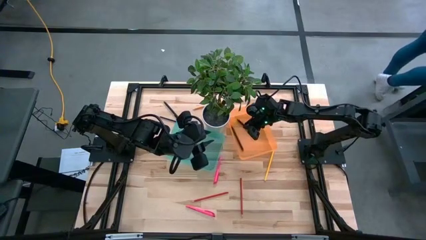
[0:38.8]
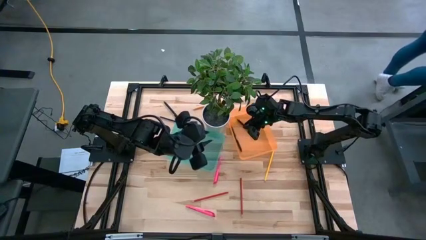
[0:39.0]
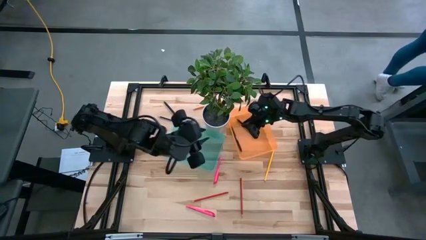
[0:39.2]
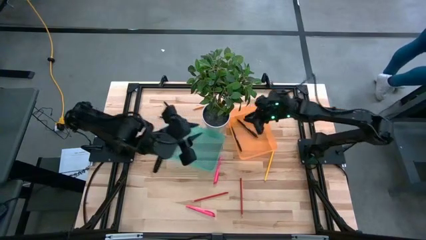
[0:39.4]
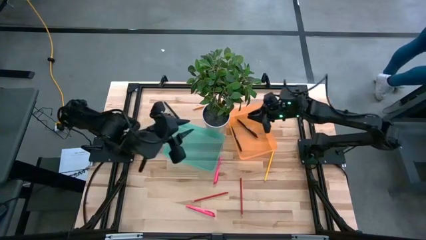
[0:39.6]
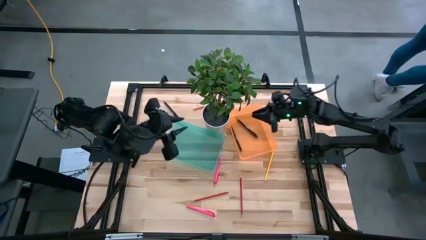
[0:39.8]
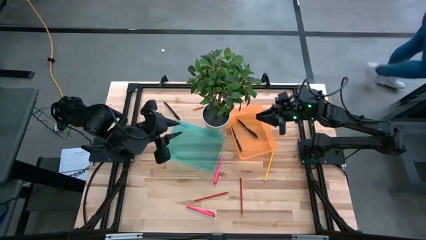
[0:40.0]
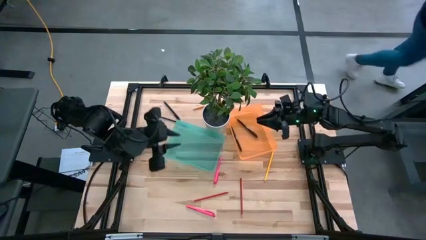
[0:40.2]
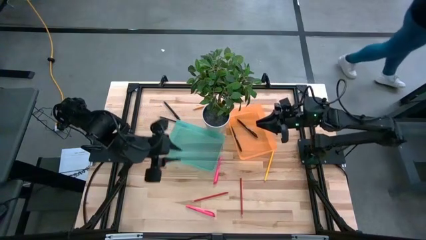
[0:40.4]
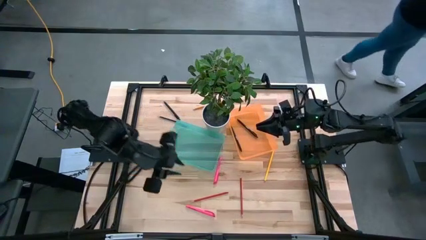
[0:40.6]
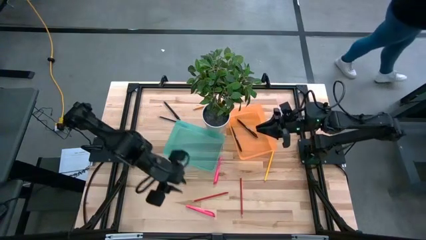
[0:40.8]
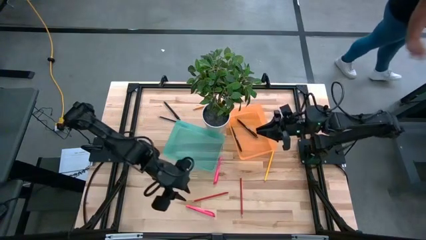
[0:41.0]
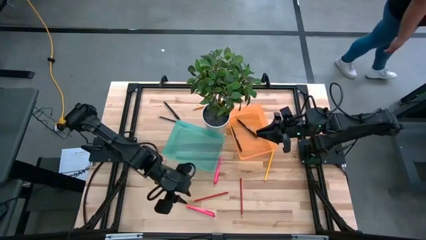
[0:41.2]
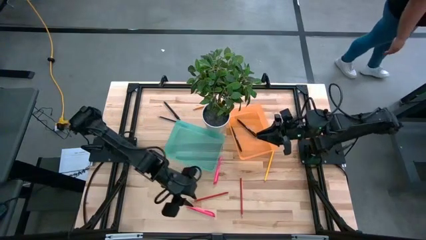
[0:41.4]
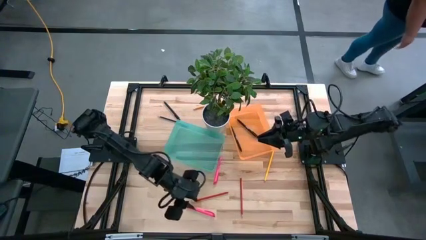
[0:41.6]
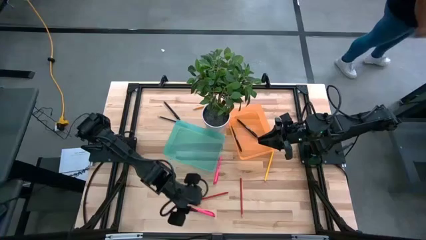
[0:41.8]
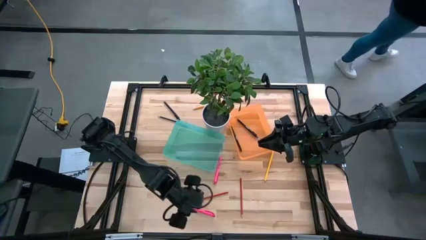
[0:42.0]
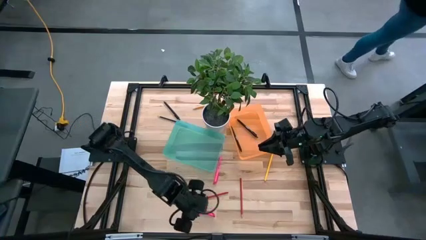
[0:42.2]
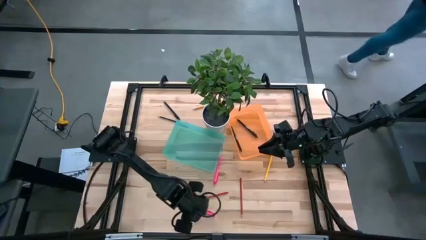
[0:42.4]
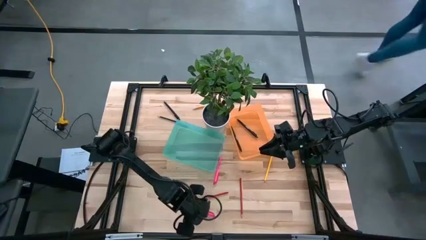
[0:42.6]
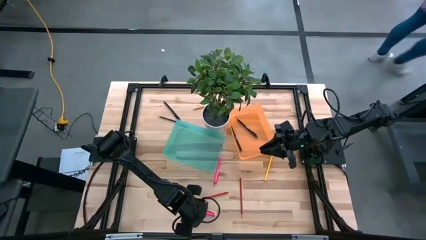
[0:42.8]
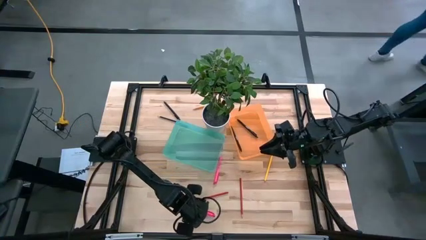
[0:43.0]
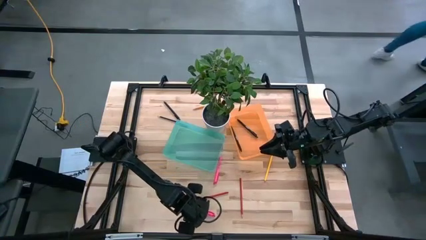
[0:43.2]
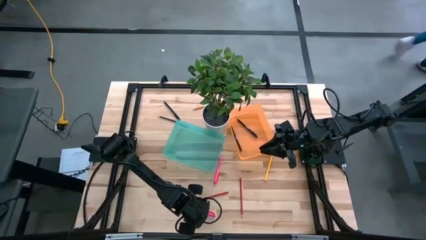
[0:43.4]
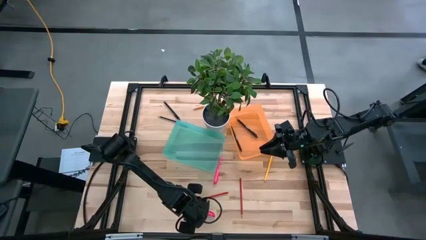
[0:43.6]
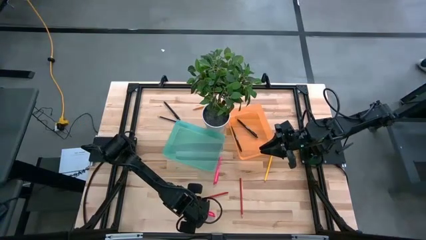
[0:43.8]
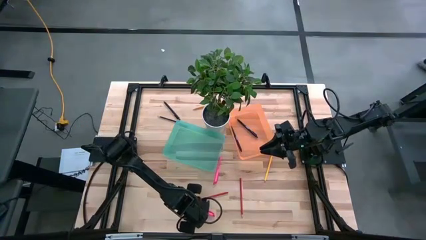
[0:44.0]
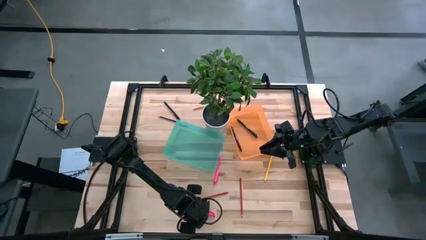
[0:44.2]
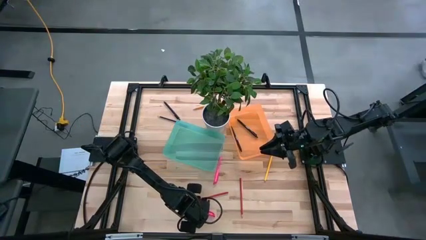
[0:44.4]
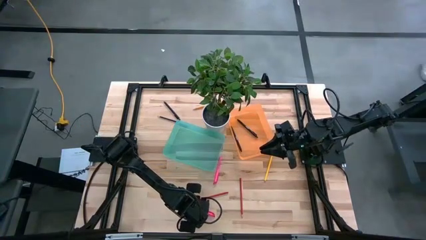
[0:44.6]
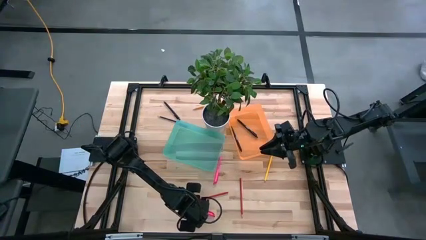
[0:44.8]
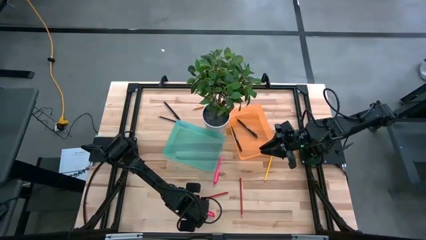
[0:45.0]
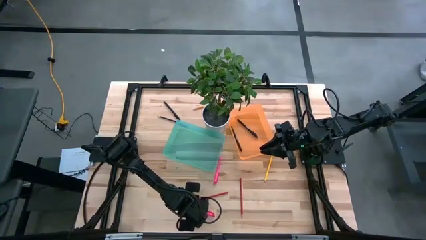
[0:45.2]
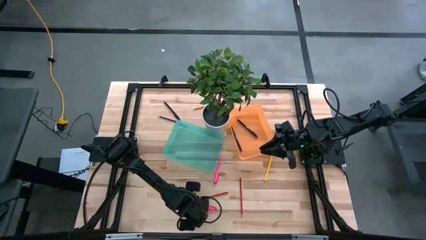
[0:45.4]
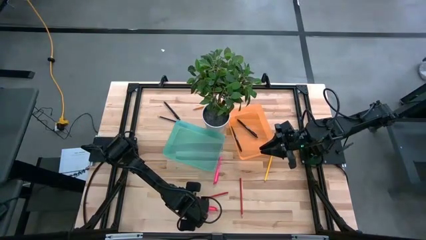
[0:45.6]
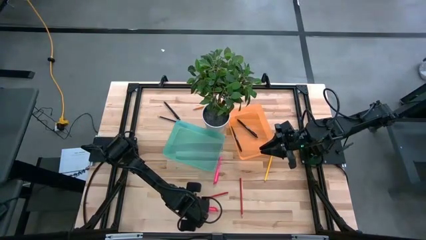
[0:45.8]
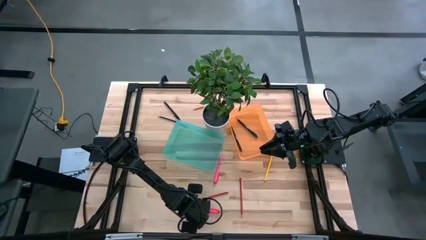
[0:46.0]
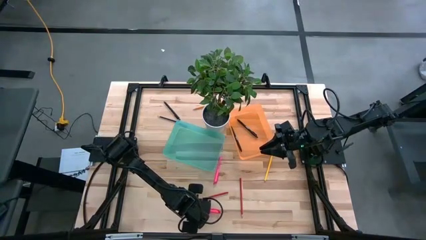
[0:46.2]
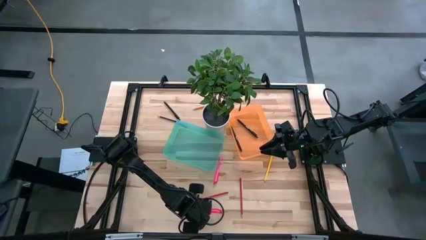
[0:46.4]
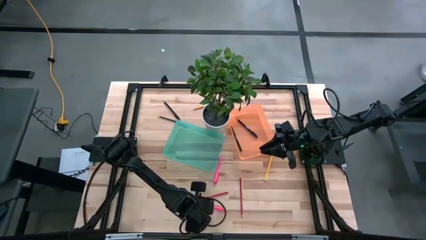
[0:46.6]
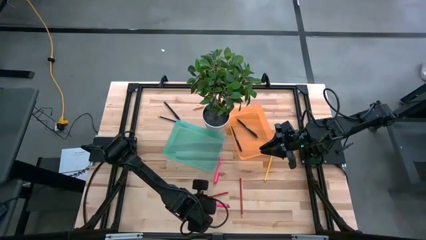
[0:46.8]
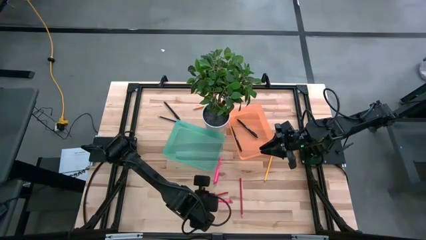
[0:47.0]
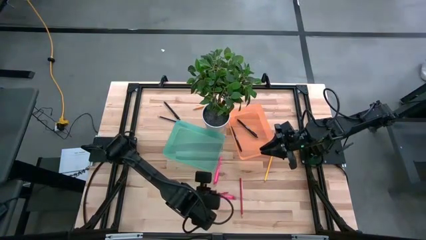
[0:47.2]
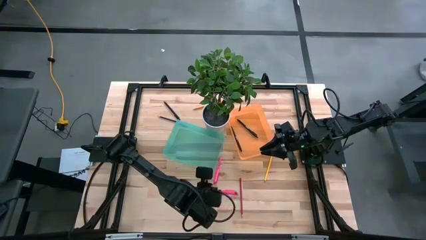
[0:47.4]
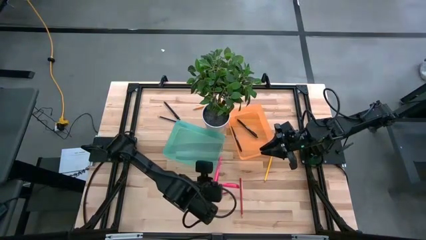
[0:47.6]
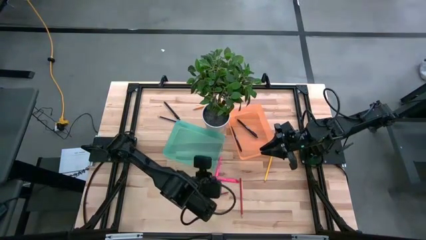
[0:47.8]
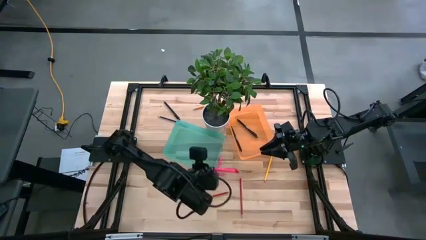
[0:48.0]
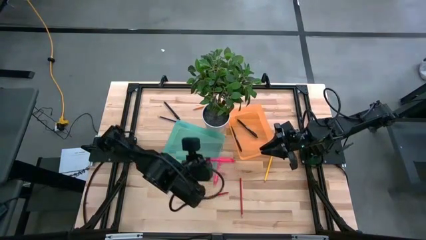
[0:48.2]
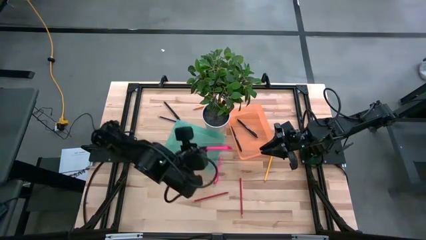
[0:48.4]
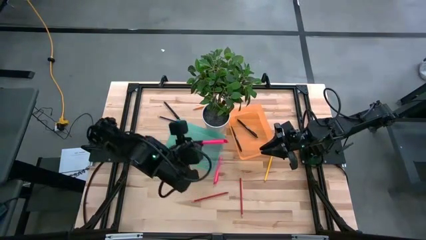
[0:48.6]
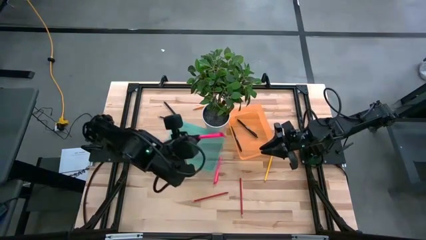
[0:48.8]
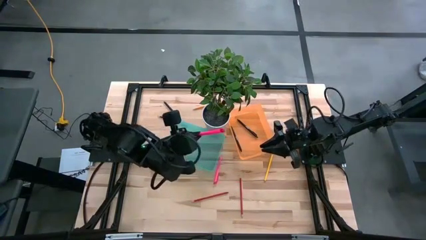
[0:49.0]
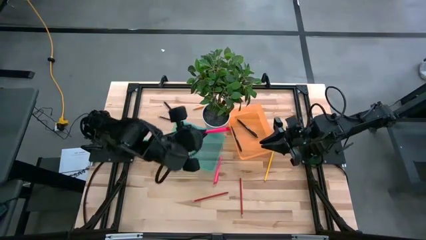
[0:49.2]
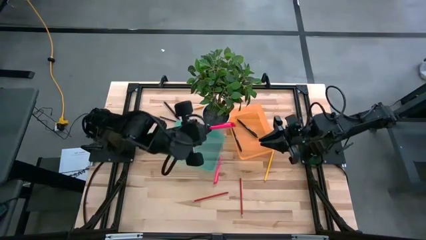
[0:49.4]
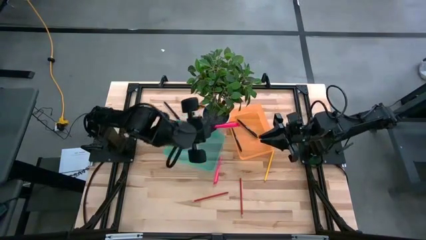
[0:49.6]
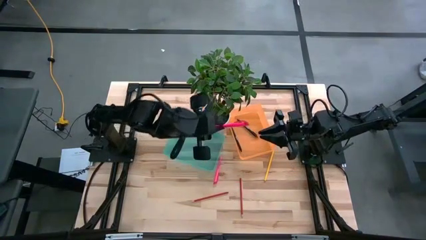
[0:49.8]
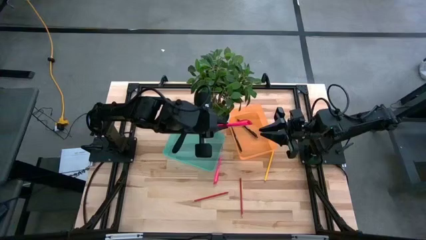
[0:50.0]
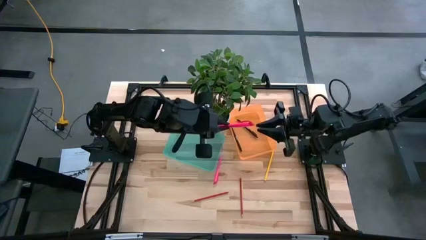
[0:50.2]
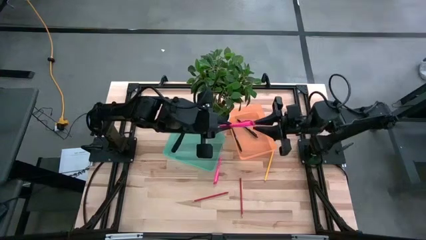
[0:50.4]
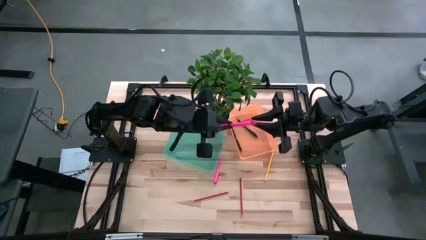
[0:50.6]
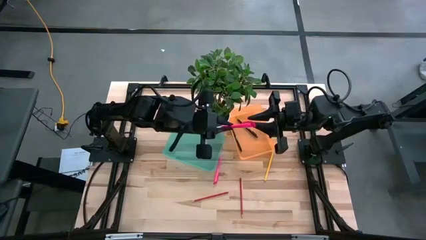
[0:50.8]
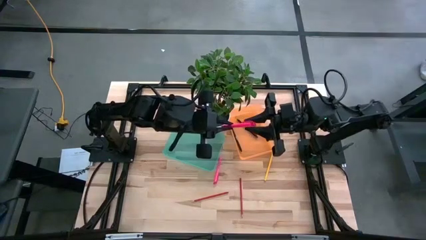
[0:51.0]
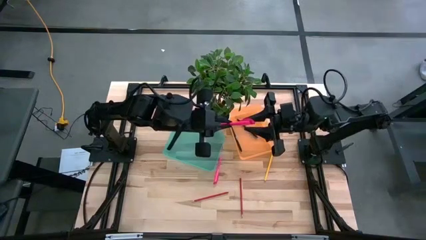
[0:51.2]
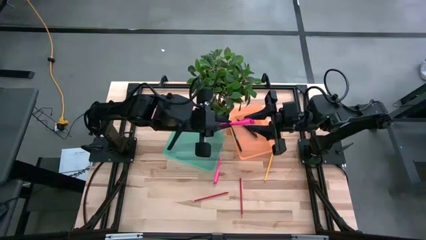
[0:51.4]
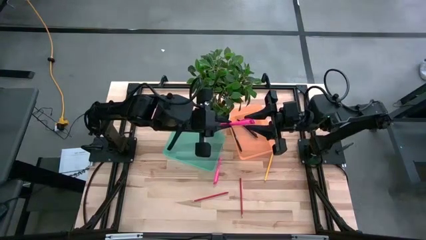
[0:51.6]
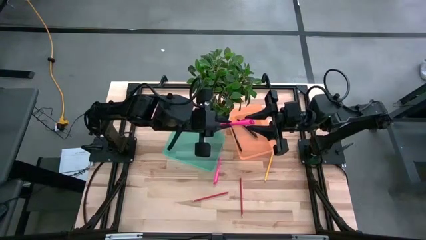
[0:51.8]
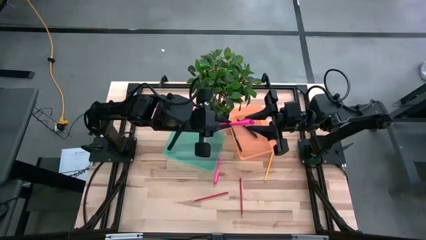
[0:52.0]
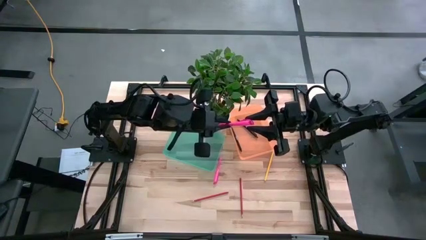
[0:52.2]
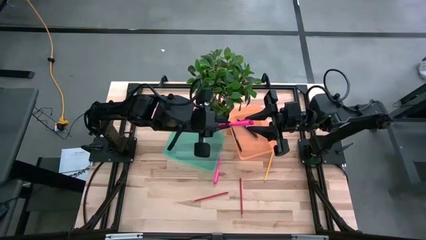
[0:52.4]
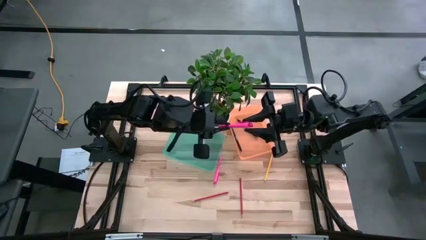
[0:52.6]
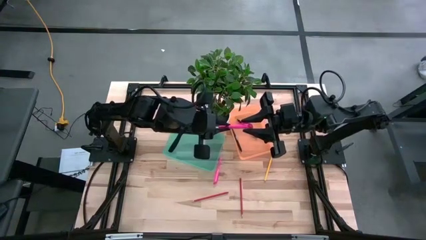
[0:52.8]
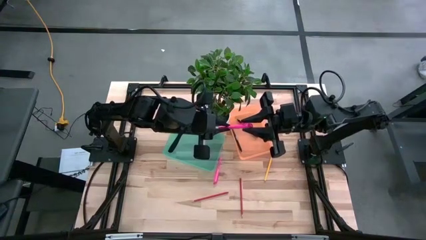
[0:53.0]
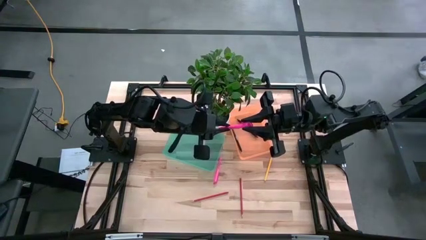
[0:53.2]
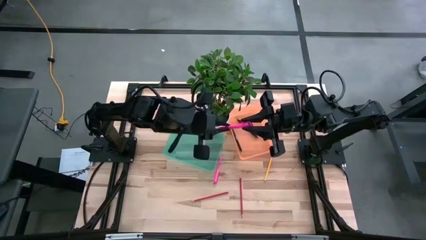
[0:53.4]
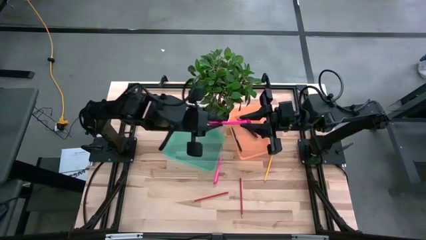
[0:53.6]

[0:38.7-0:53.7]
Task: Sort pens & pencils
Put the bottom pink pen into the orange bin
